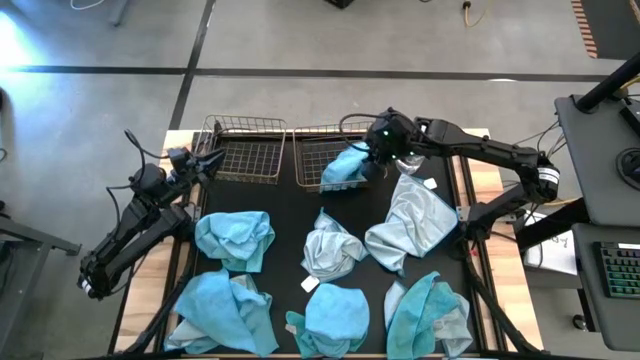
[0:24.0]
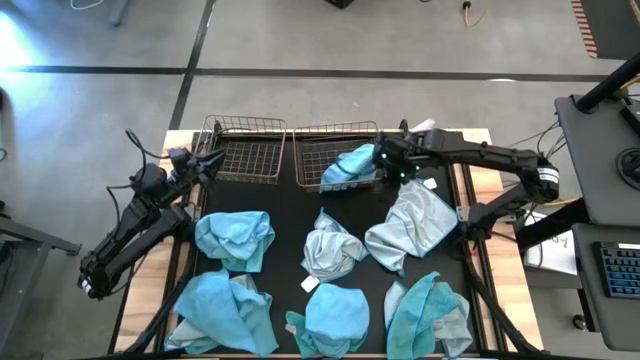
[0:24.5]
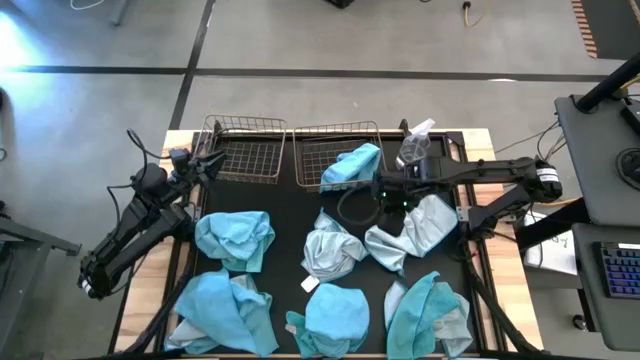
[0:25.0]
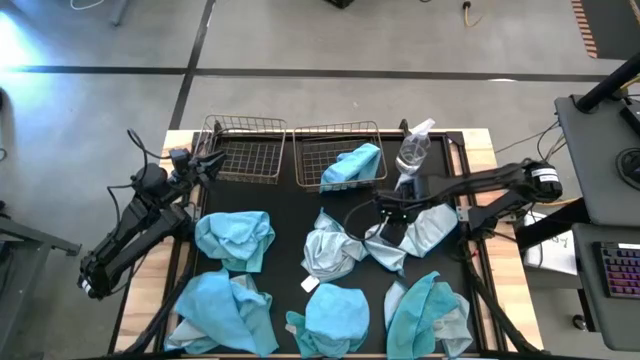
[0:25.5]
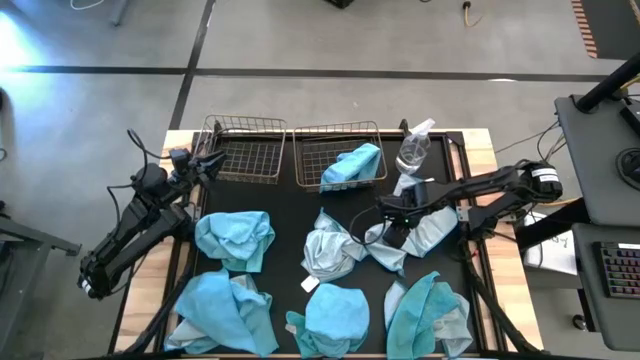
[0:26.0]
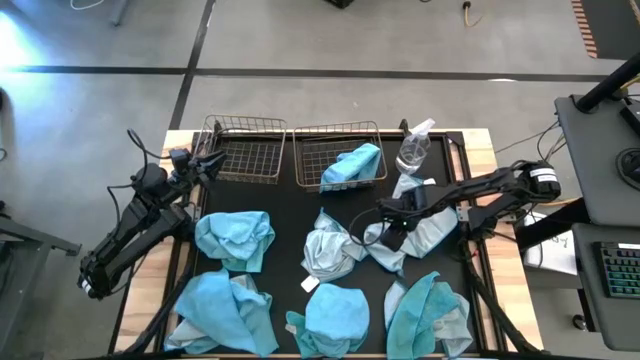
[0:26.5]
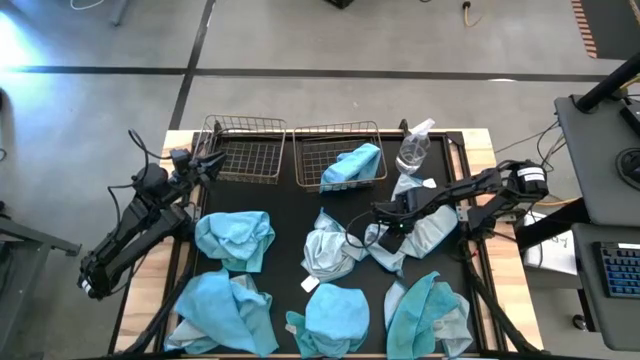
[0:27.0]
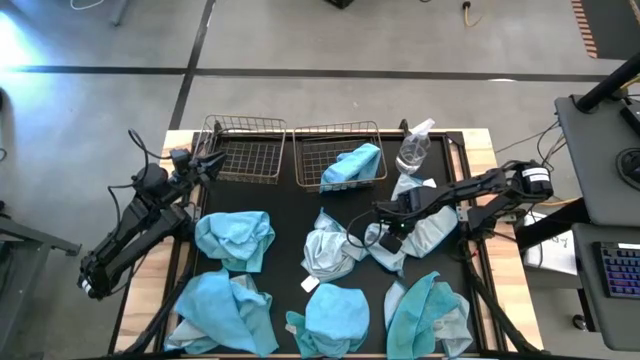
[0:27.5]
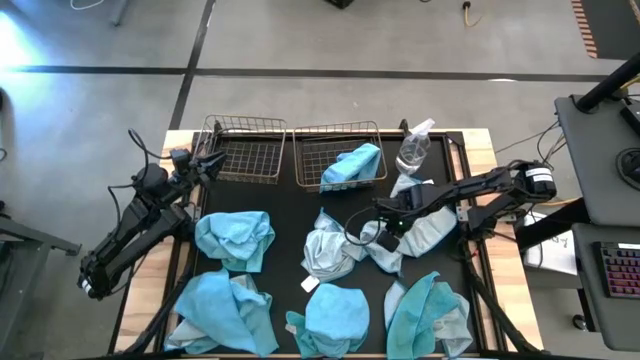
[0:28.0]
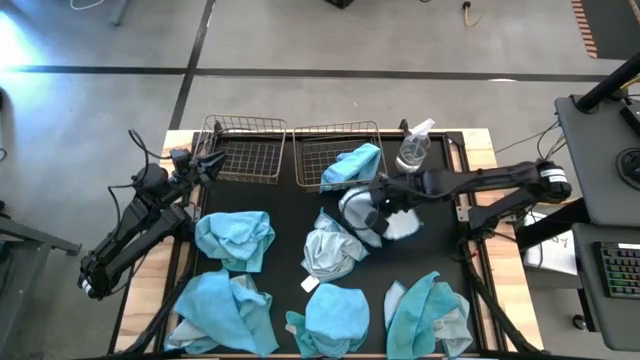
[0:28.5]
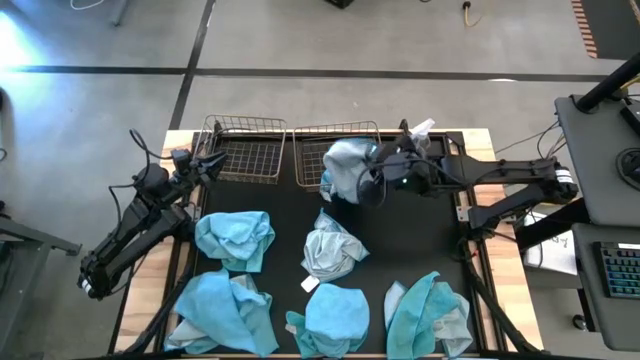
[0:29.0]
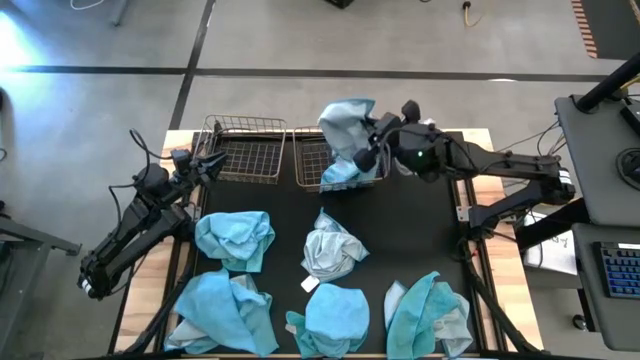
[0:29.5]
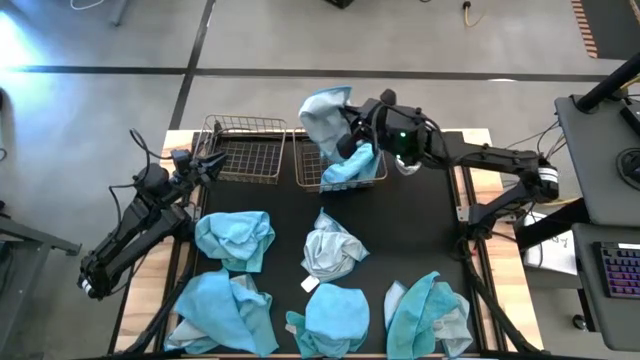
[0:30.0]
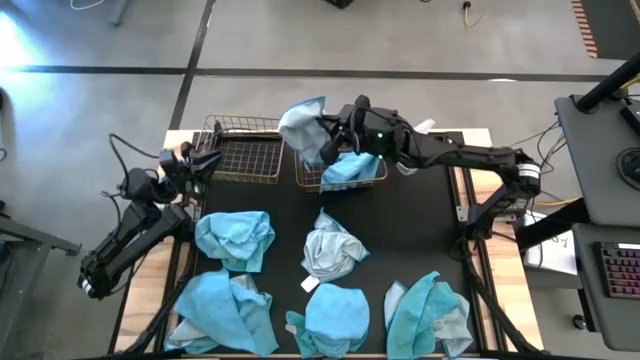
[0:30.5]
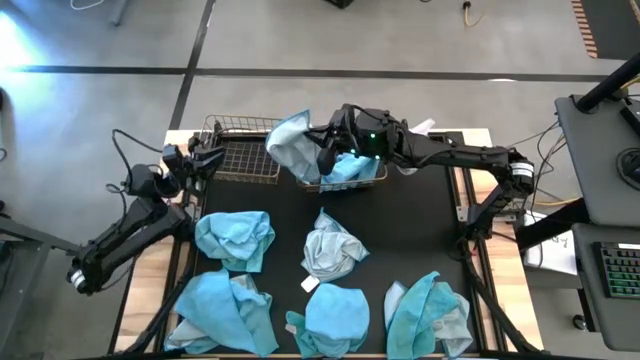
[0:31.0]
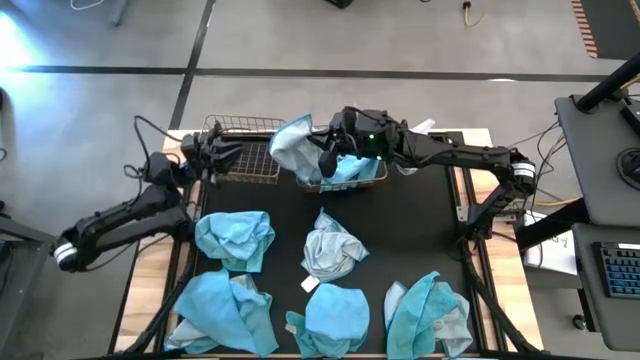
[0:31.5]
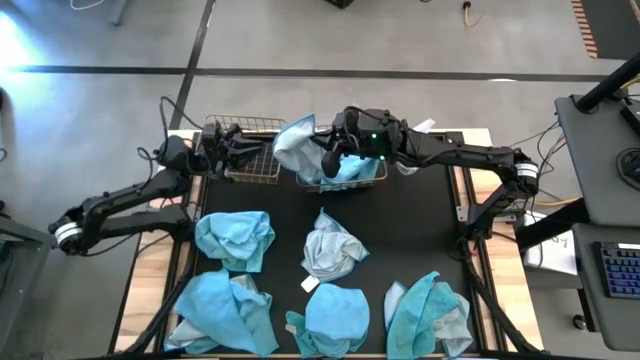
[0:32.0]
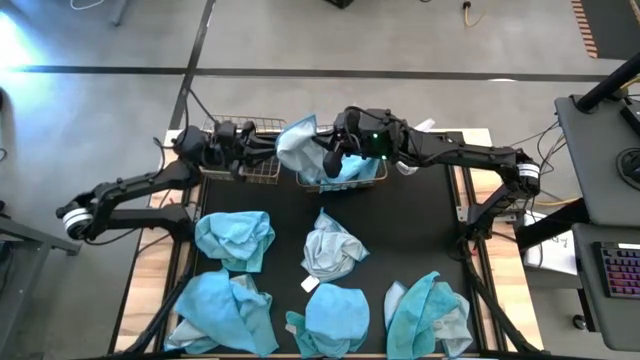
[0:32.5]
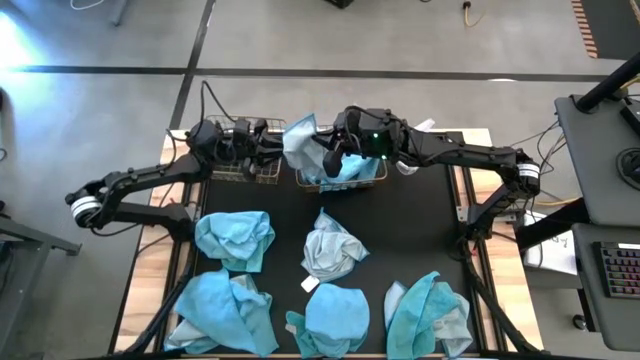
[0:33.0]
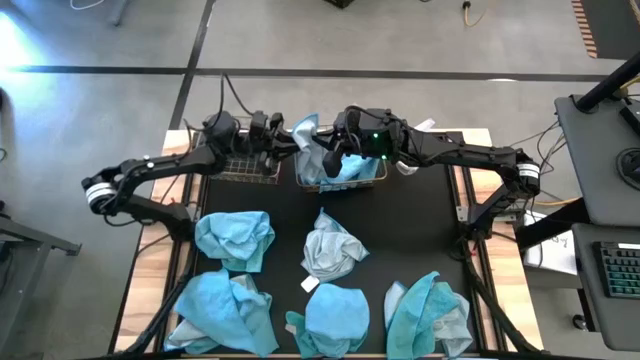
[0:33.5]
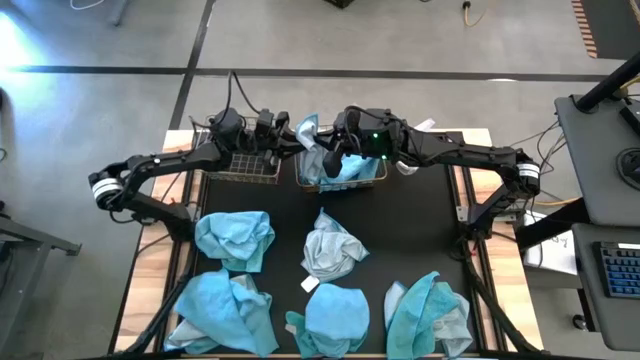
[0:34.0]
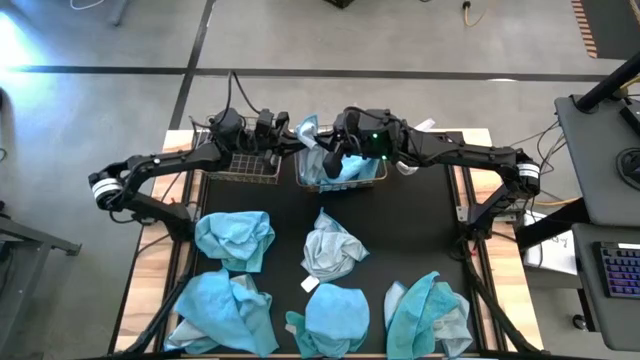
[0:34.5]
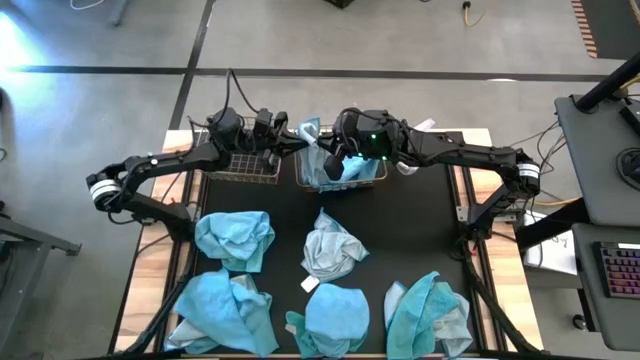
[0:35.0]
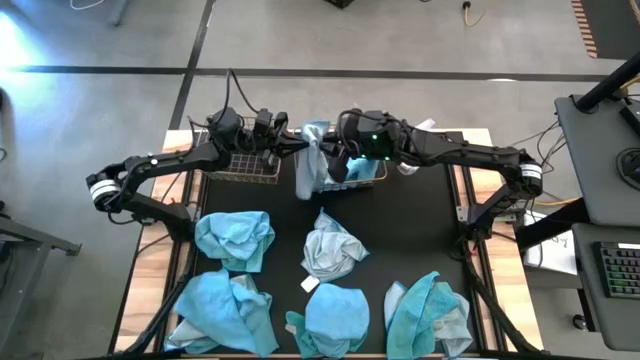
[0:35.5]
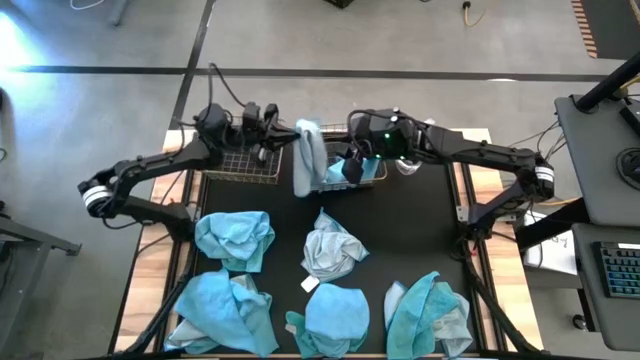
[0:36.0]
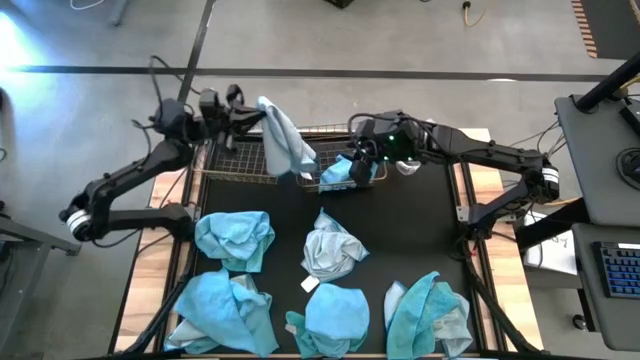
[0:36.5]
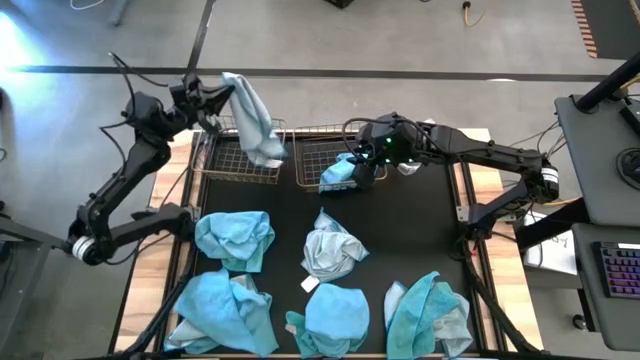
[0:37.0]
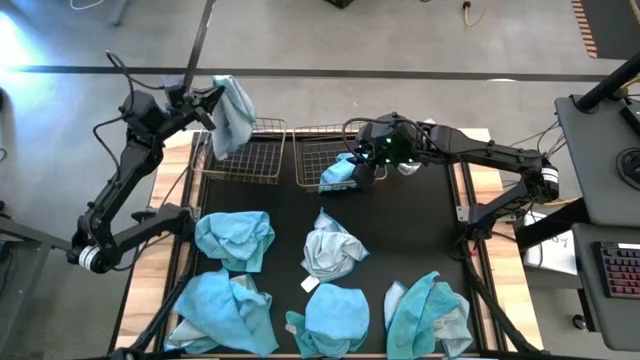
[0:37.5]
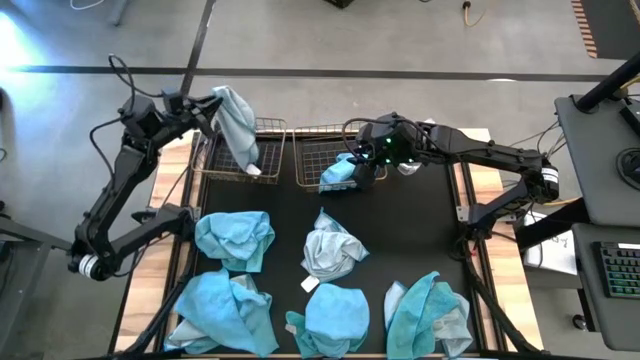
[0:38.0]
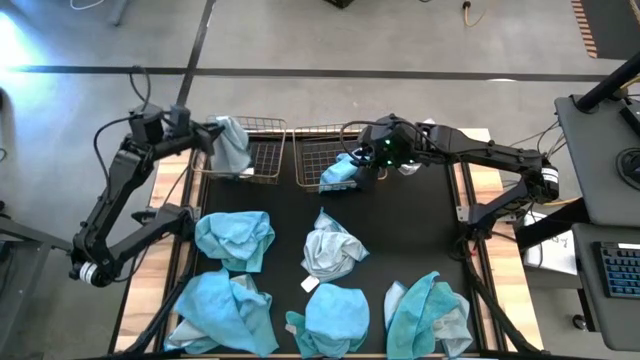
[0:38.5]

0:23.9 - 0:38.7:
Task: Sort microfiber towel by color & place in baskets
Put the light-blue microfiber towel into the left wire basket

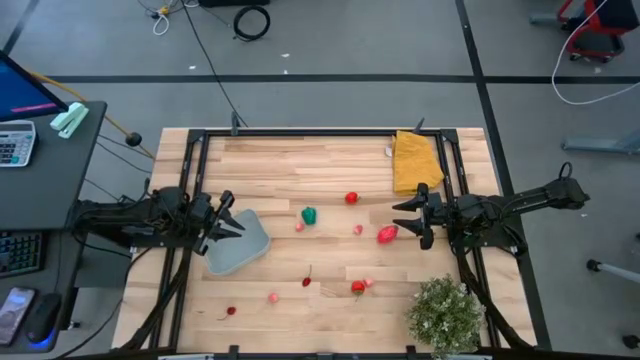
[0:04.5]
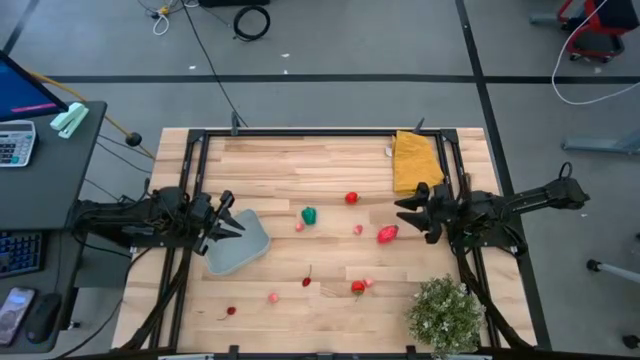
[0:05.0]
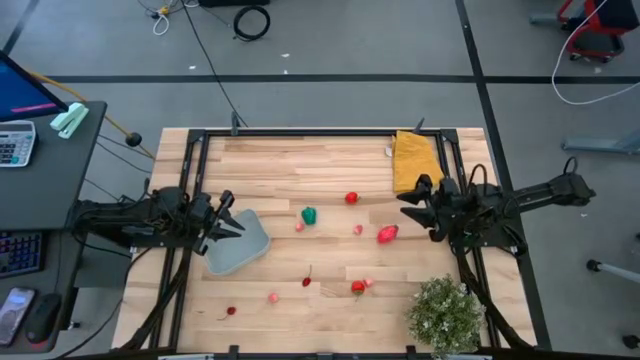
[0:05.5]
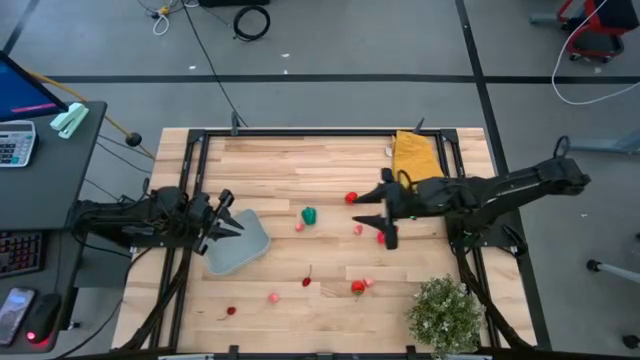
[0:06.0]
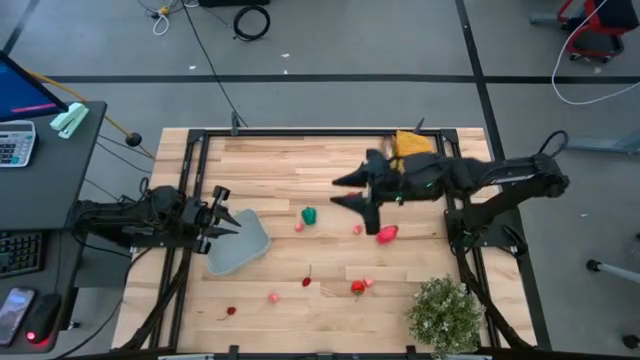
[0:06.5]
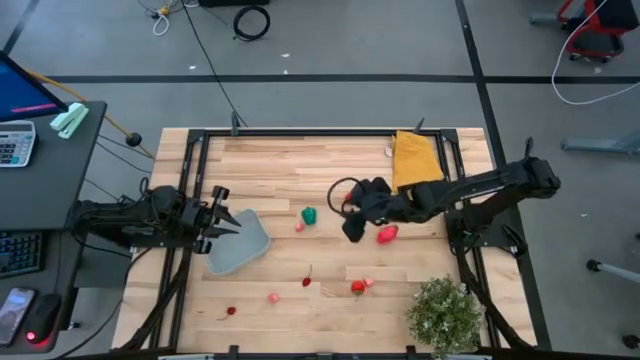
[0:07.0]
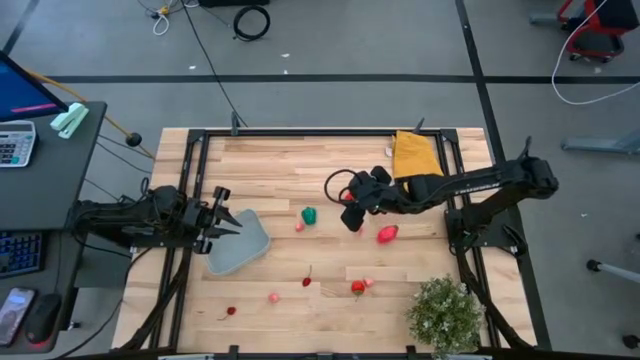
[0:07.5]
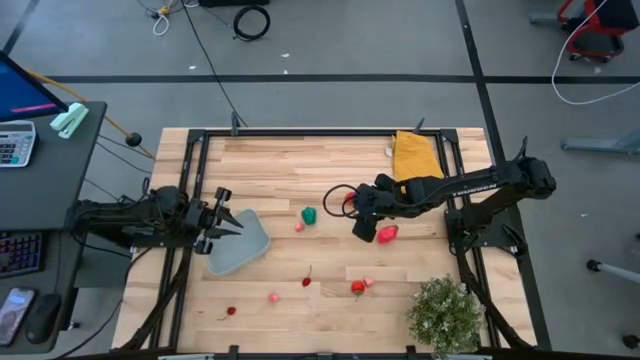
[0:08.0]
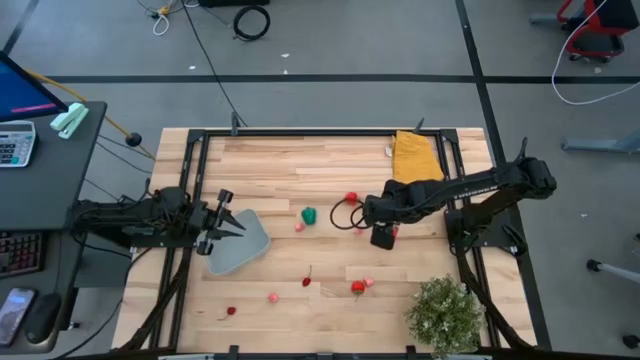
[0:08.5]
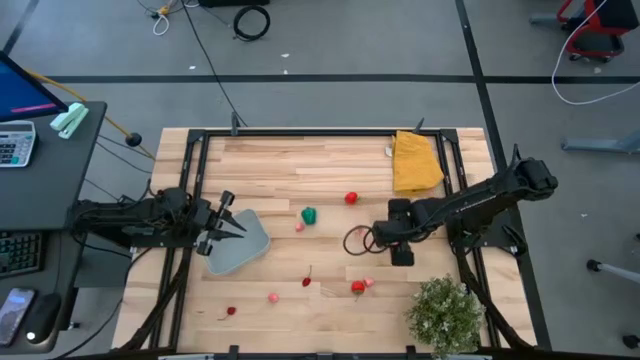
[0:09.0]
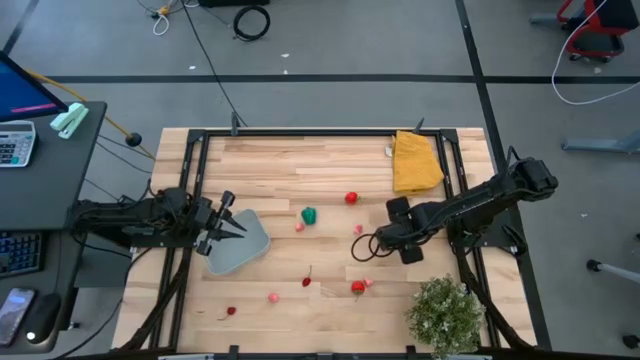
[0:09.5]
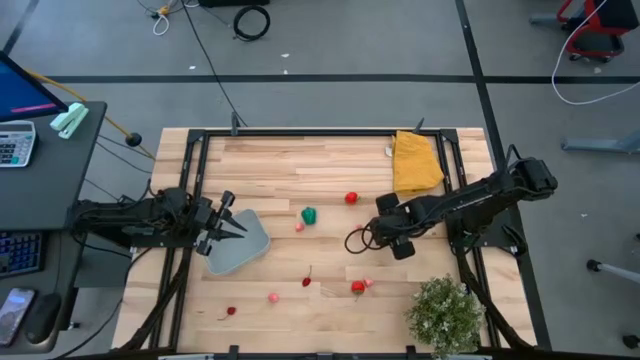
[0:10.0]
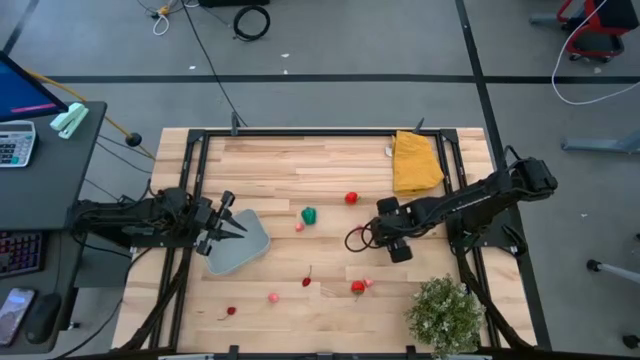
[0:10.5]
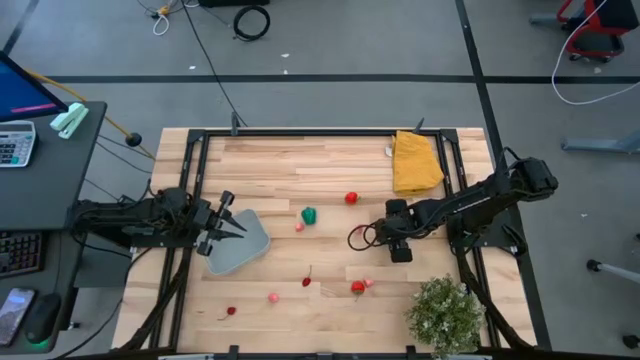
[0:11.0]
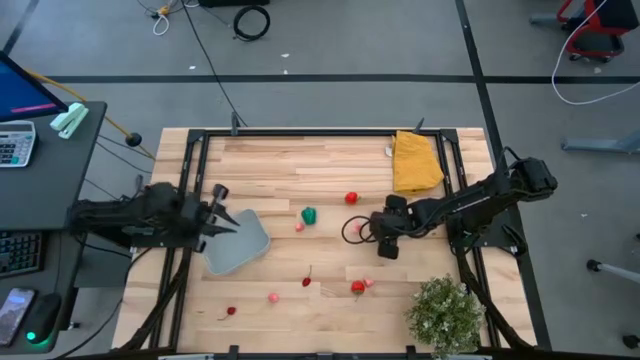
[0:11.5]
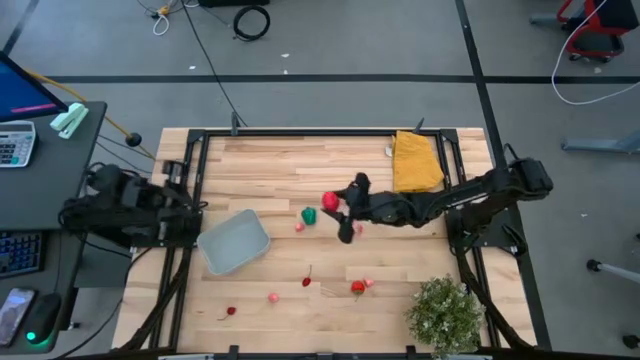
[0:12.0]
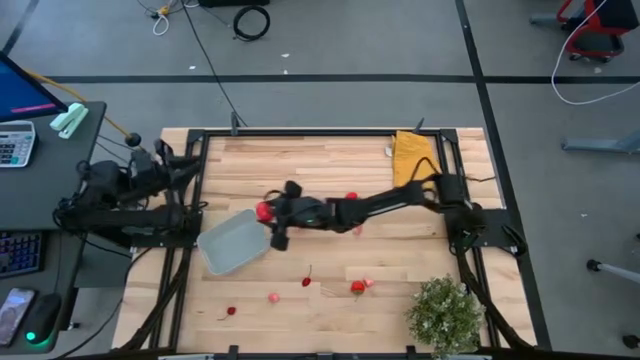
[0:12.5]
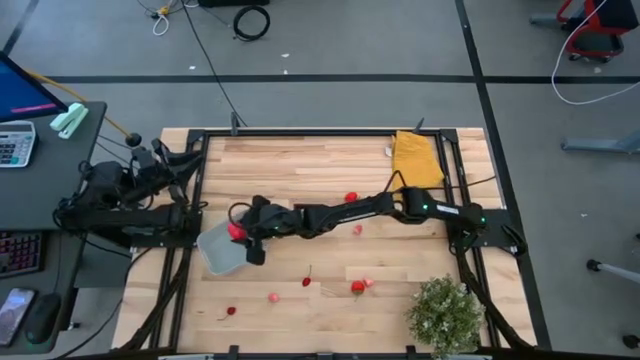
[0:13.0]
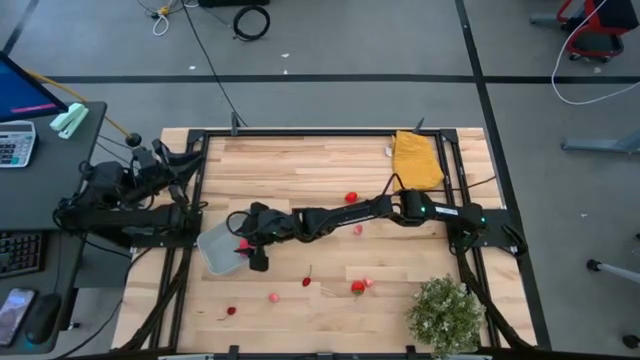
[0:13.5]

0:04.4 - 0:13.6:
Task: Pick and placing Produce into tupperware
Put the red dragonfruit into the gray bin
